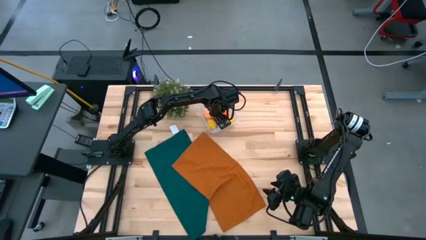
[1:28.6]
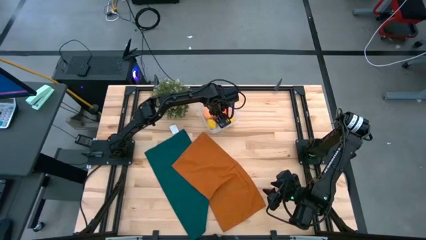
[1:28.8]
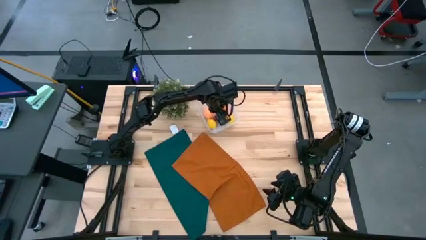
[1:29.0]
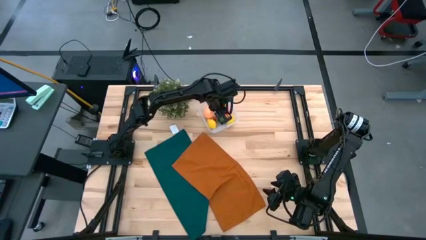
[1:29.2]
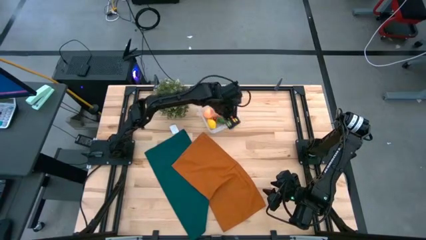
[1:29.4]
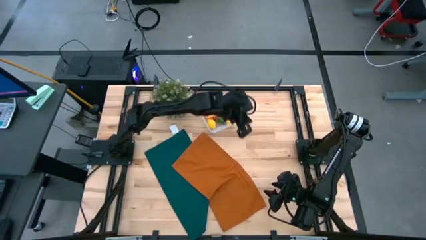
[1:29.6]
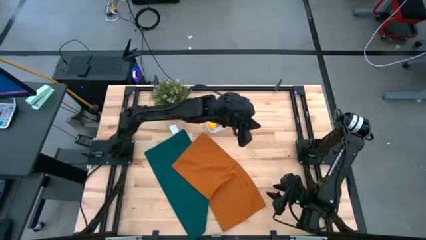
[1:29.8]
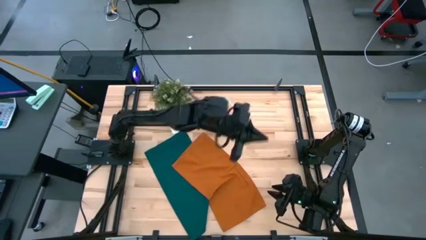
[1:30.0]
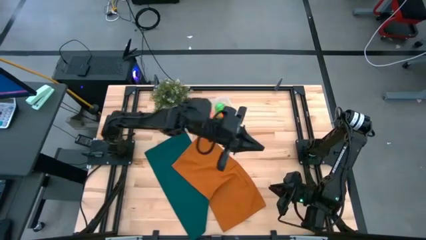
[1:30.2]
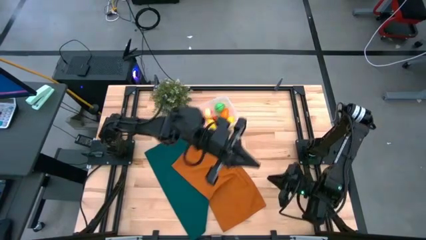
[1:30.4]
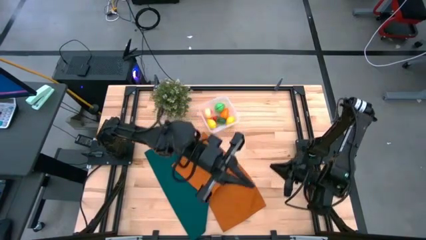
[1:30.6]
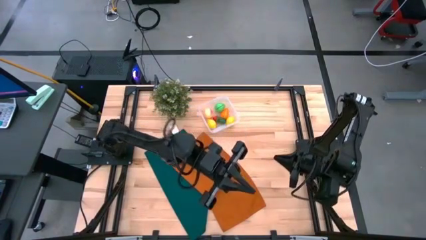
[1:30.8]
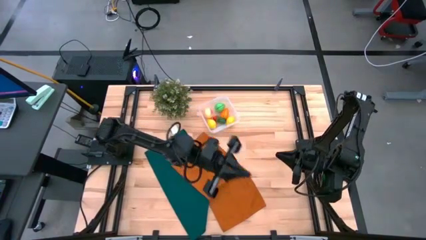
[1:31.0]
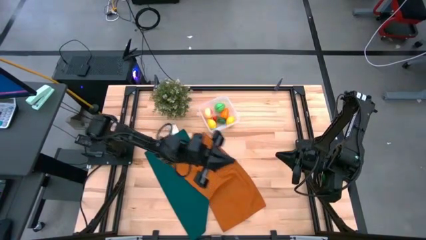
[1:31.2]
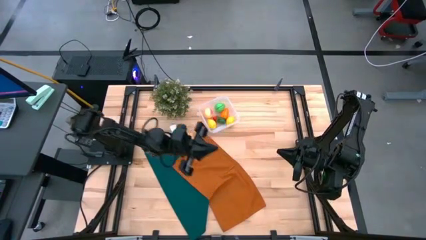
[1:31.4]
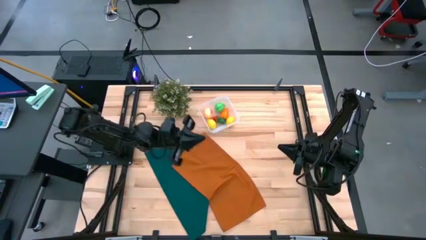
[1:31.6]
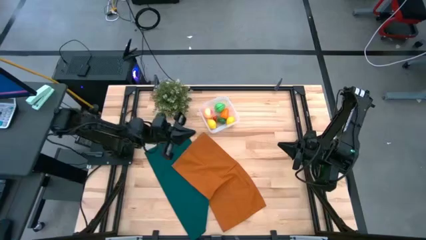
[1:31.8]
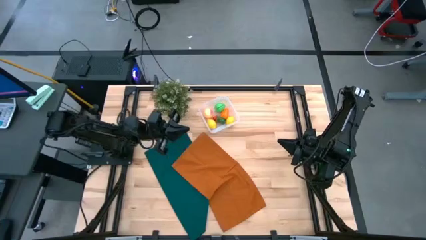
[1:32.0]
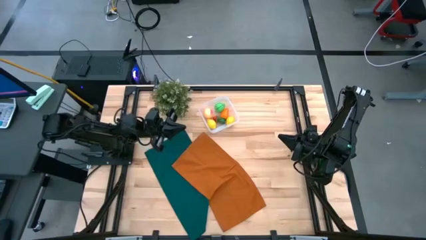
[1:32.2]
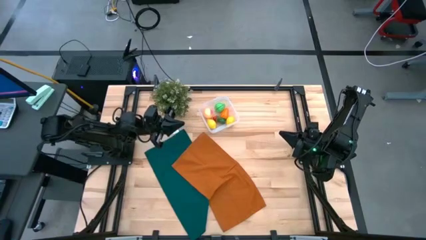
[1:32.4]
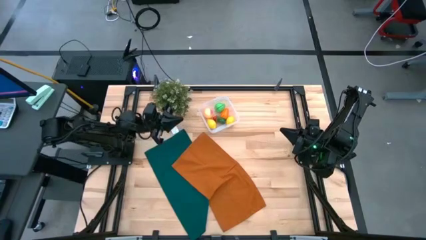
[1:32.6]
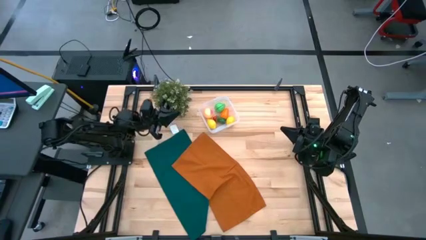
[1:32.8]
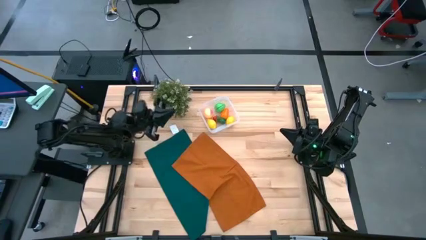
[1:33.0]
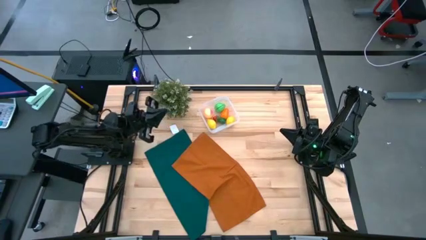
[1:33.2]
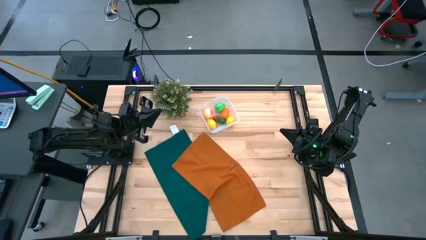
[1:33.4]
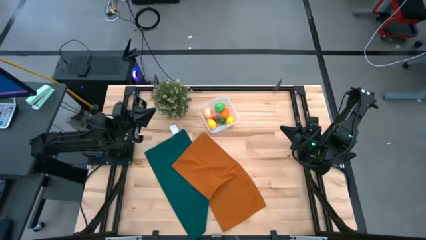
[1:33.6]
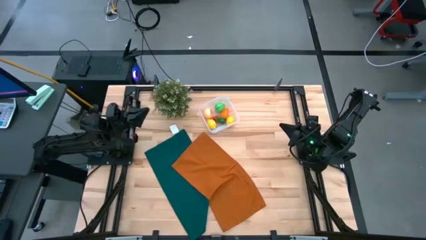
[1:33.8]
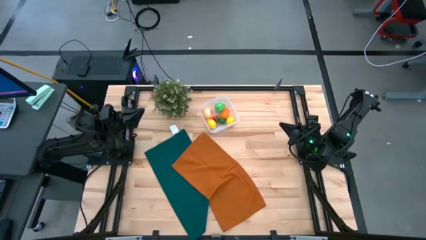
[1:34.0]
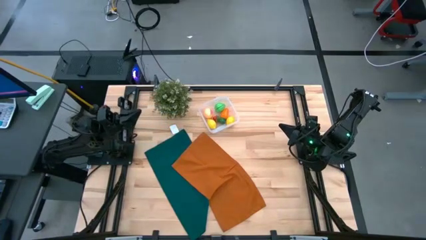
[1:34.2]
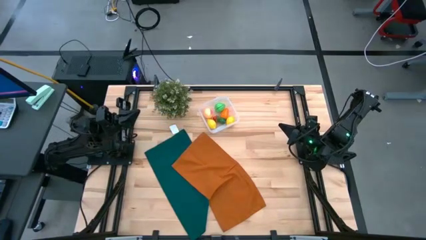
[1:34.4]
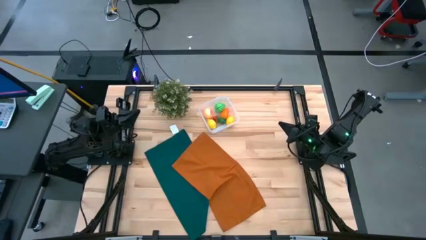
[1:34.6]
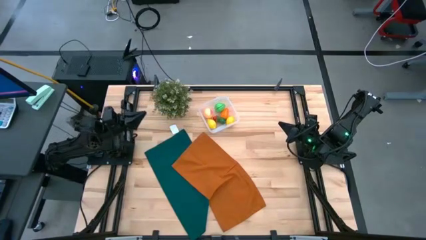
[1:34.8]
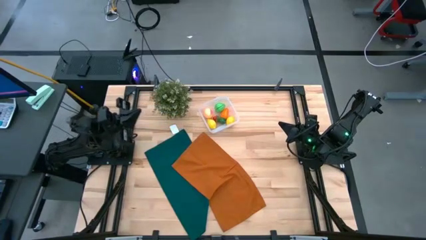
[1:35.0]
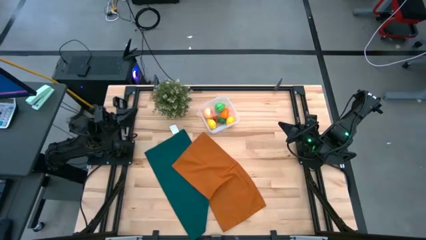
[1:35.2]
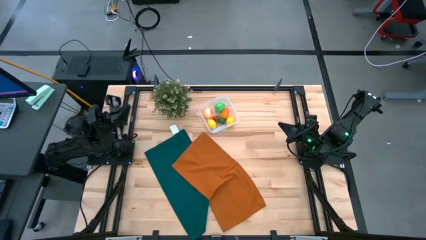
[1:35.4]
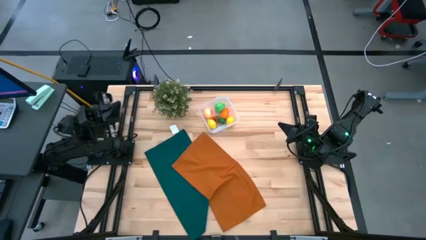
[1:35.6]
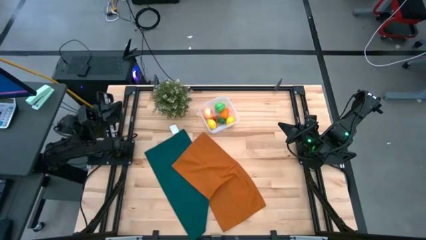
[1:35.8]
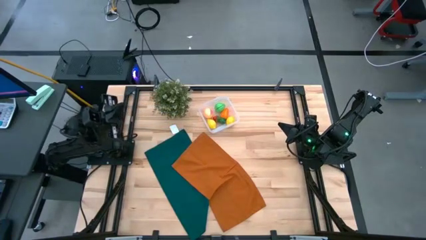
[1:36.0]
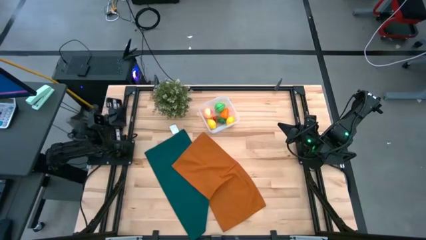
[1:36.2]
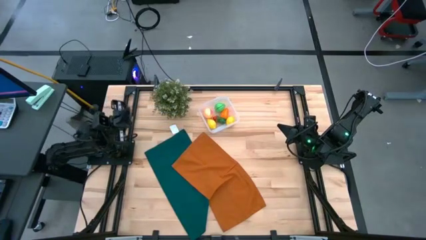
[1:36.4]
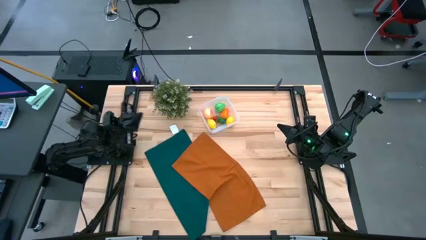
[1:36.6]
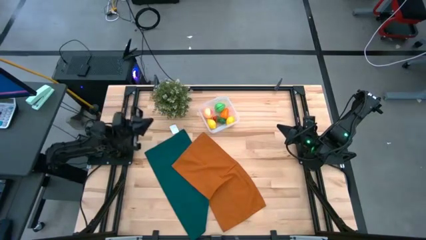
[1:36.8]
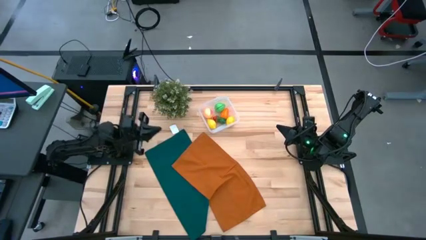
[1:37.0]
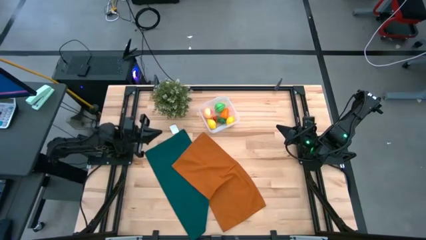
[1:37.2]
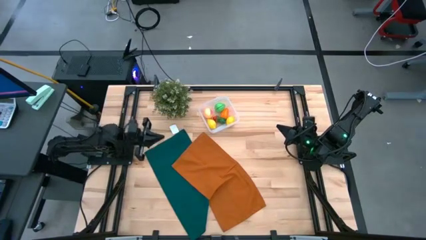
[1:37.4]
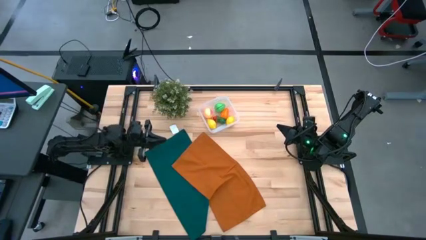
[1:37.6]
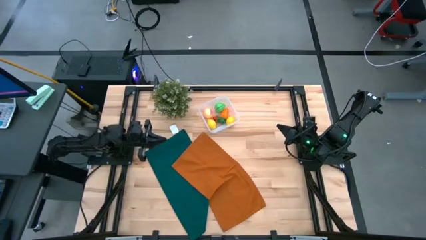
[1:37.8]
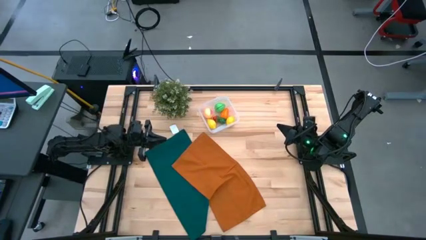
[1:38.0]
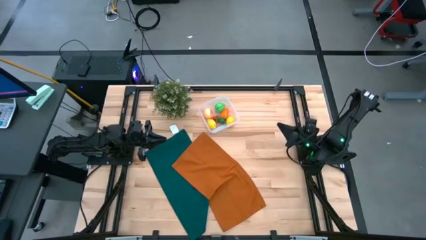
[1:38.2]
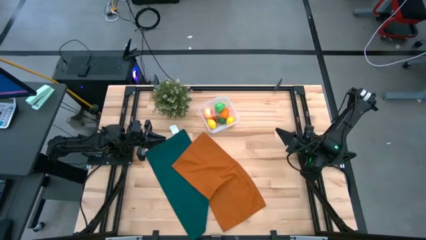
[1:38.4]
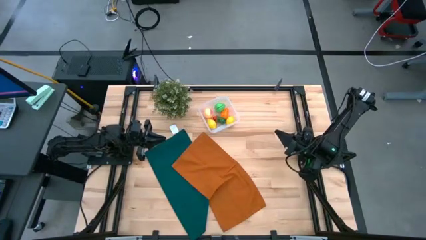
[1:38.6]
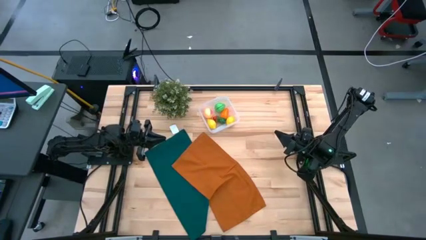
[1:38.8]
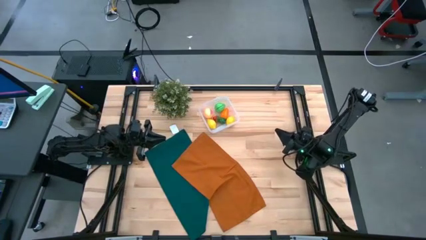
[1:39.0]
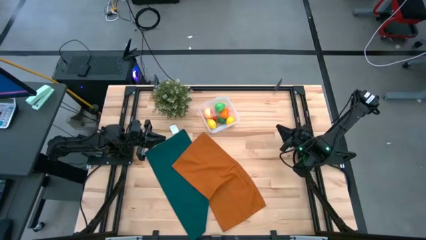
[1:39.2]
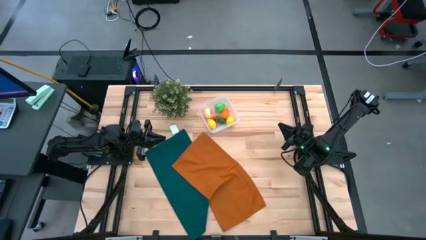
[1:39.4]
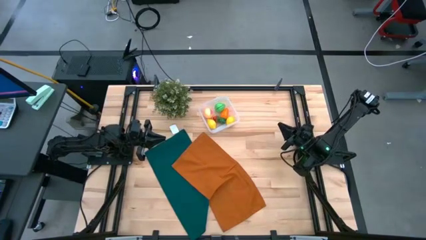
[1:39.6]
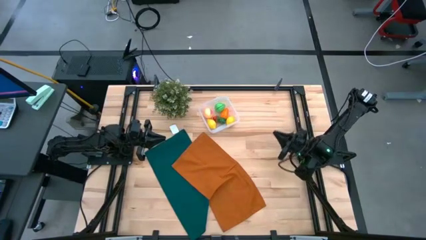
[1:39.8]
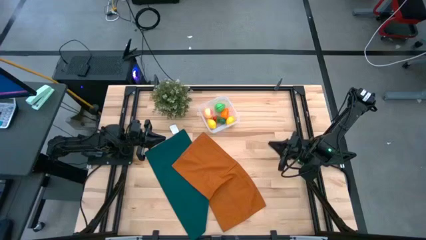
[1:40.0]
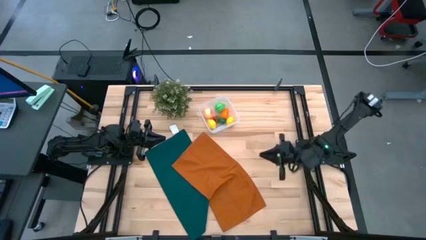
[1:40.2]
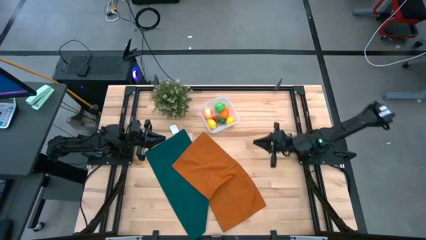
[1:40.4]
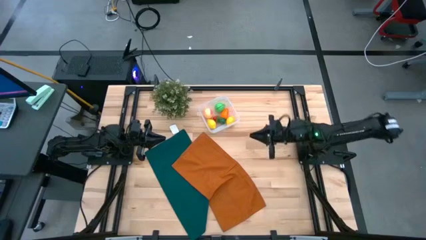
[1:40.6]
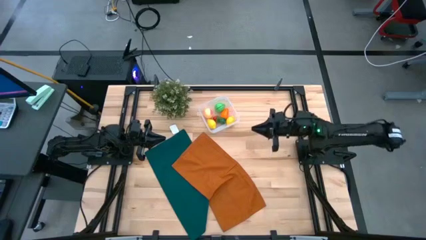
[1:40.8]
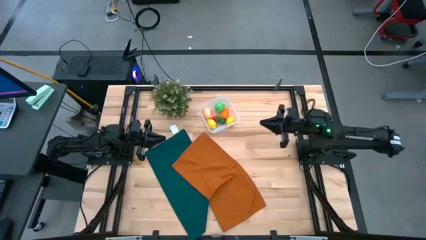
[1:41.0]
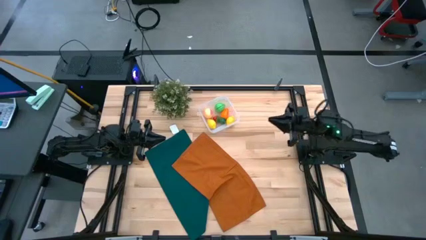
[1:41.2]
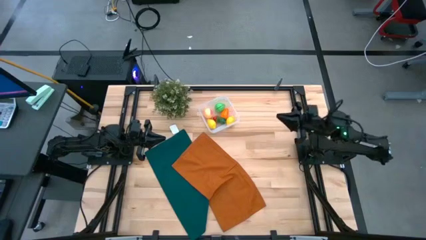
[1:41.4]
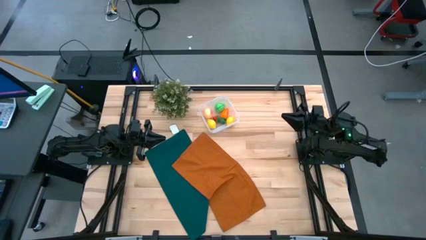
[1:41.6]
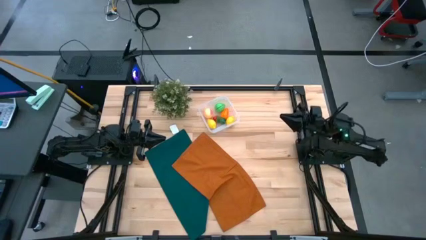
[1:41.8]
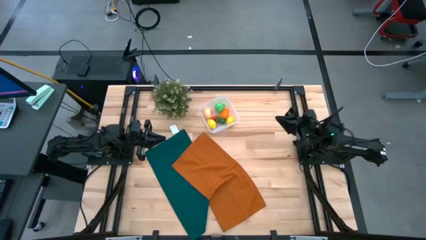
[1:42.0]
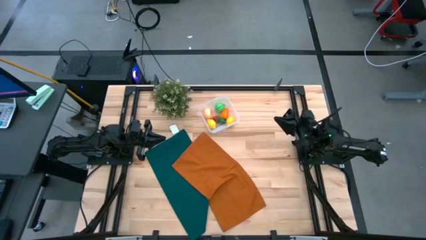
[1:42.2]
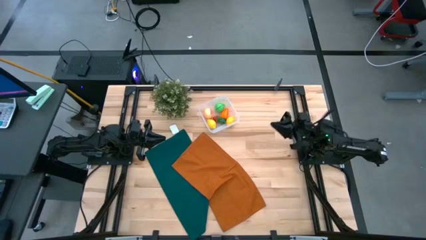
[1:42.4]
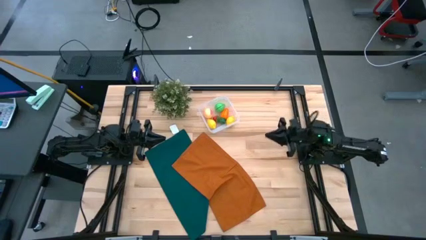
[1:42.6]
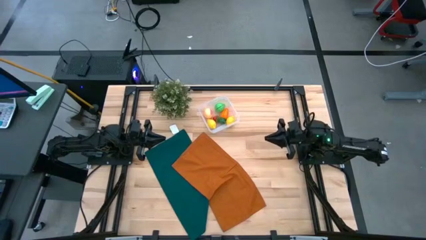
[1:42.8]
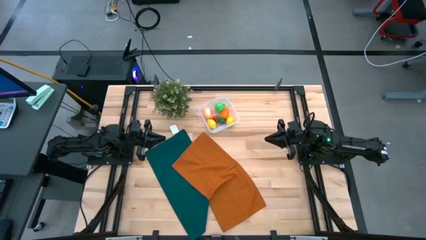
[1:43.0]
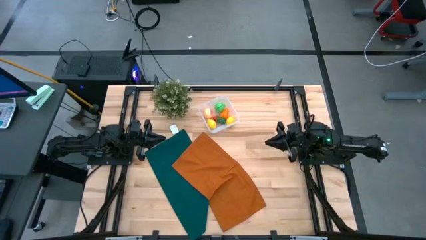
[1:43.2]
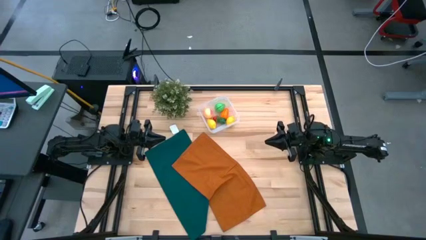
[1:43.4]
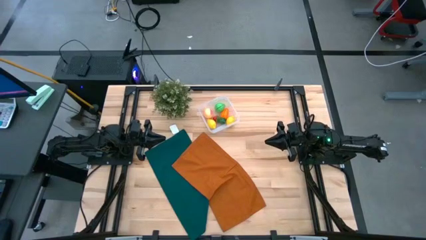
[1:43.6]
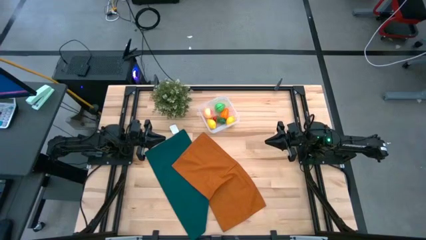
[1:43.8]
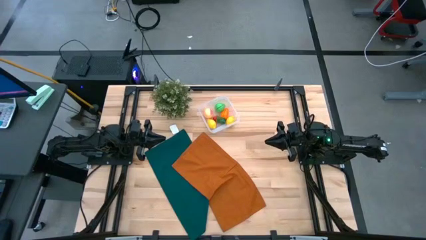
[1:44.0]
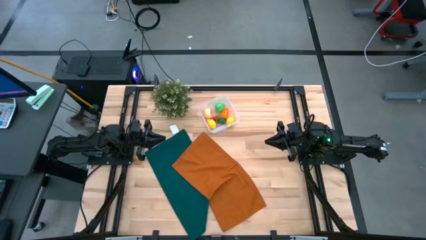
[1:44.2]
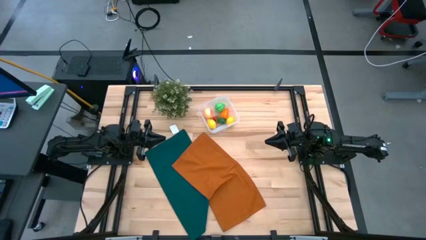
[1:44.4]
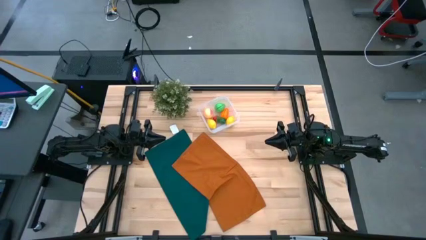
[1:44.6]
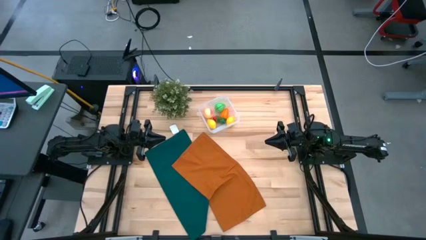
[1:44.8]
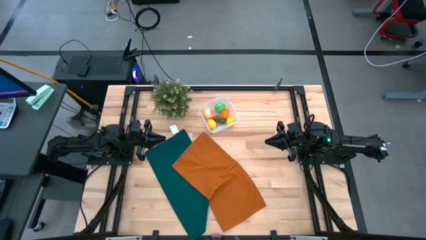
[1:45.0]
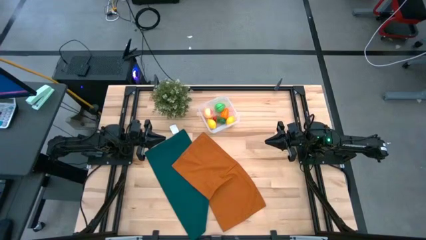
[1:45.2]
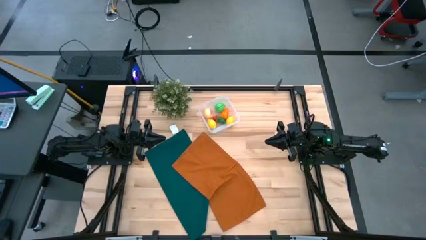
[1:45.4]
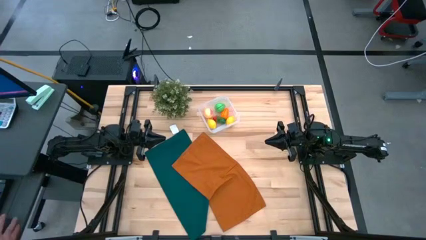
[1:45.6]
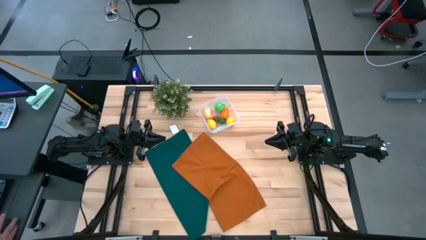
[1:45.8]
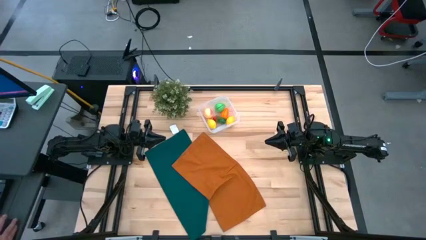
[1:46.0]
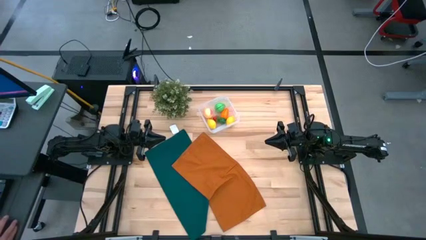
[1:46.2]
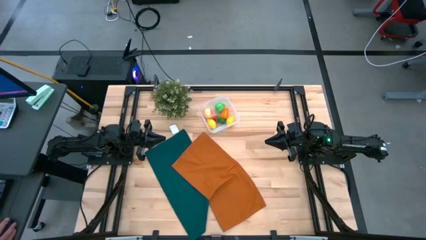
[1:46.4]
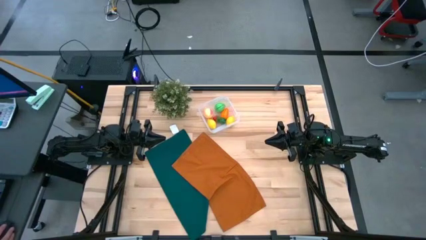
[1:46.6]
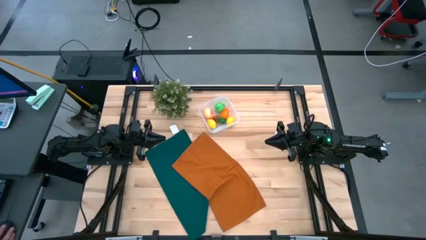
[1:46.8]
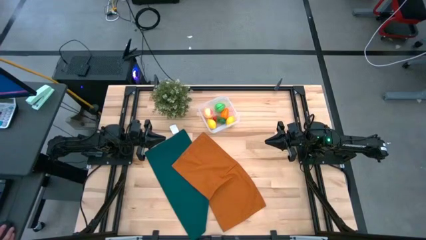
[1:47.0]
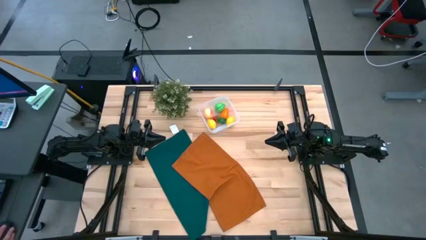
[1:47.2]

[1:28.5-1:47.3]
Task: Pick and placing Produce into tupperware
Return to Home Position
